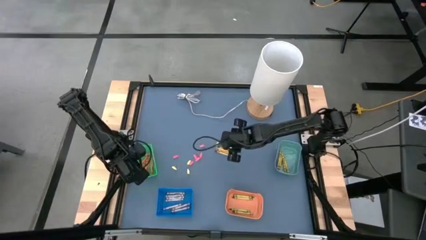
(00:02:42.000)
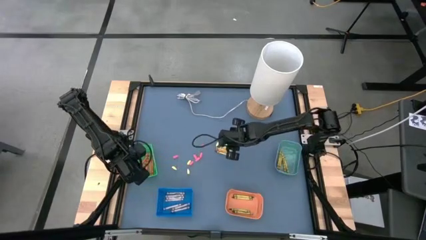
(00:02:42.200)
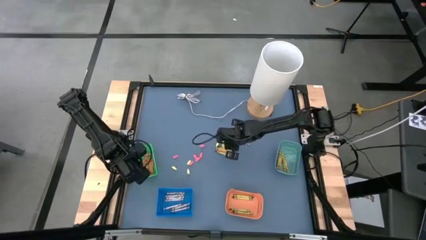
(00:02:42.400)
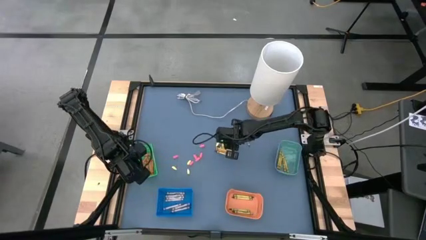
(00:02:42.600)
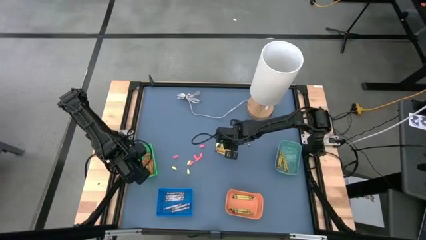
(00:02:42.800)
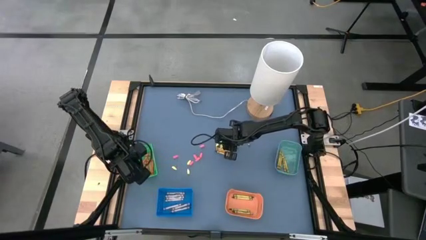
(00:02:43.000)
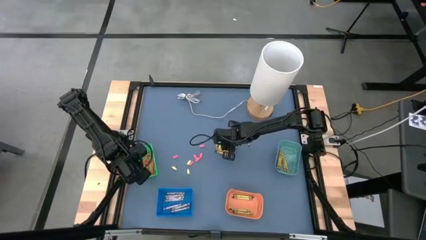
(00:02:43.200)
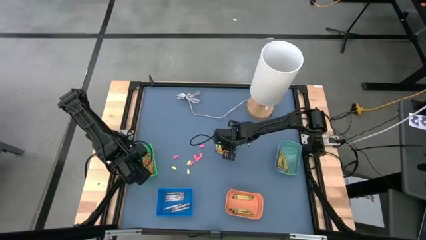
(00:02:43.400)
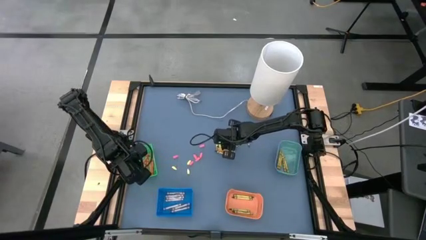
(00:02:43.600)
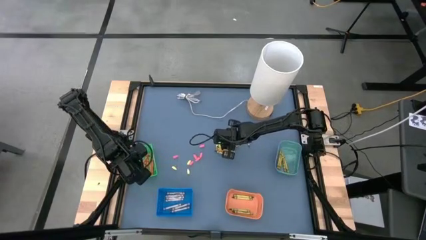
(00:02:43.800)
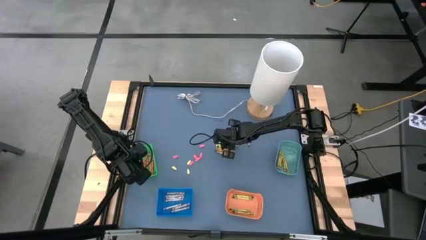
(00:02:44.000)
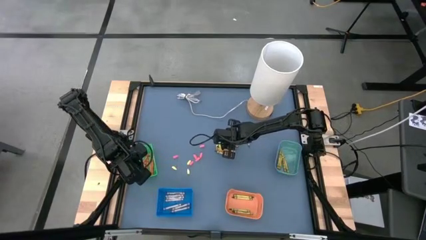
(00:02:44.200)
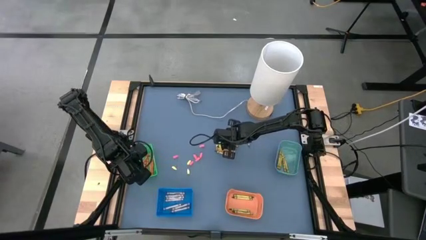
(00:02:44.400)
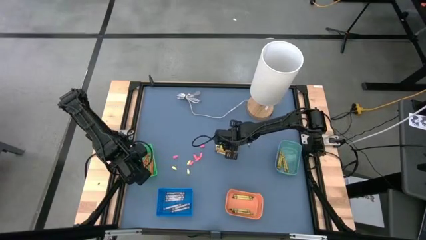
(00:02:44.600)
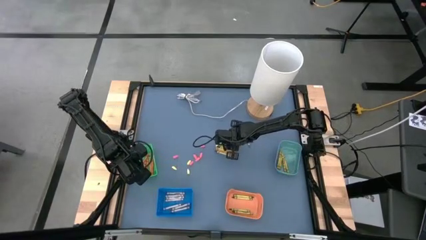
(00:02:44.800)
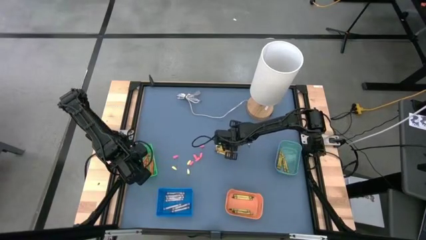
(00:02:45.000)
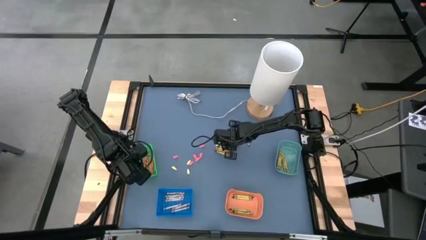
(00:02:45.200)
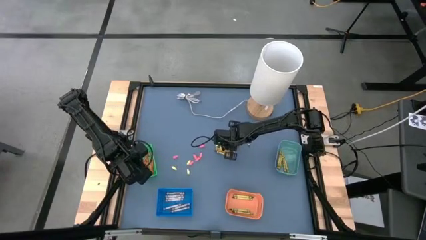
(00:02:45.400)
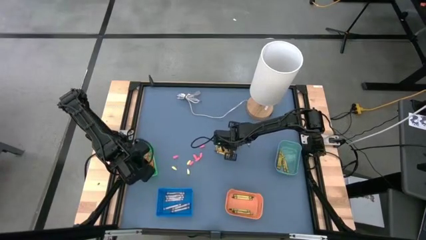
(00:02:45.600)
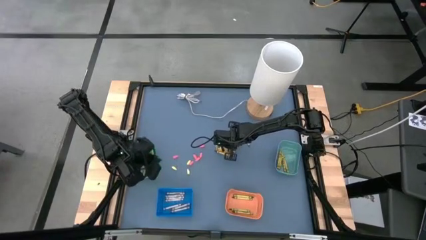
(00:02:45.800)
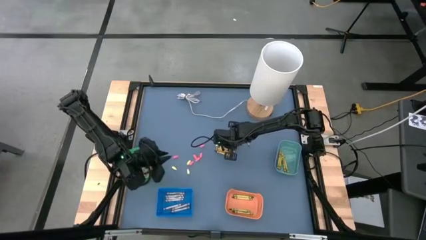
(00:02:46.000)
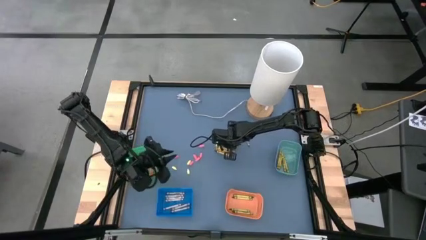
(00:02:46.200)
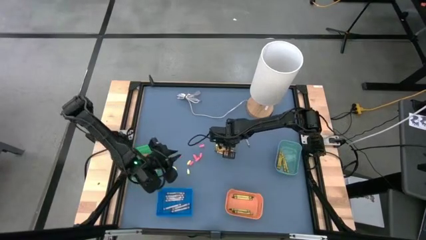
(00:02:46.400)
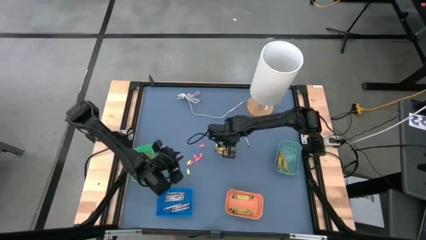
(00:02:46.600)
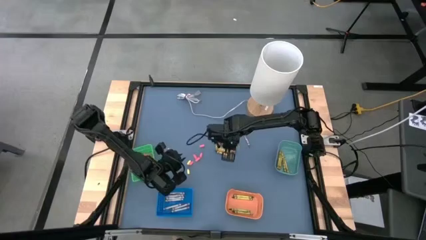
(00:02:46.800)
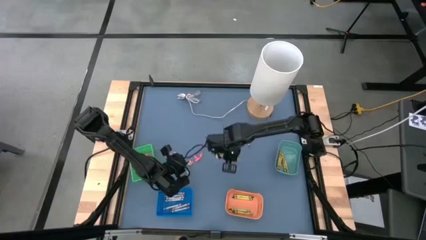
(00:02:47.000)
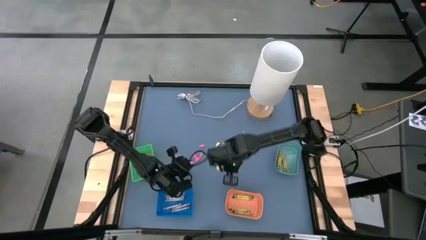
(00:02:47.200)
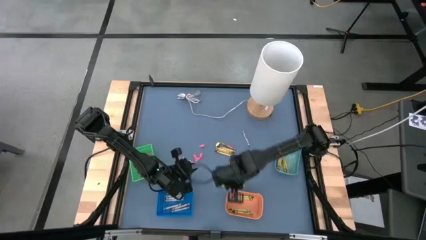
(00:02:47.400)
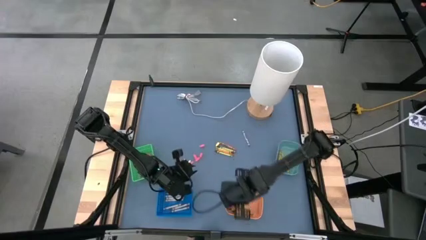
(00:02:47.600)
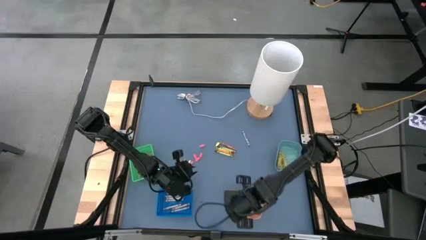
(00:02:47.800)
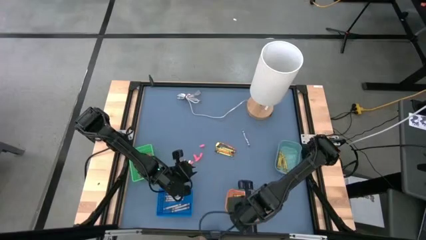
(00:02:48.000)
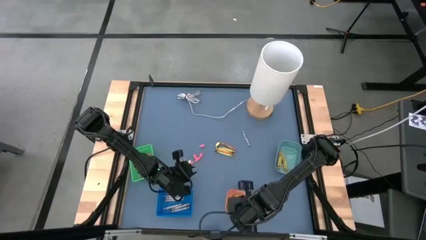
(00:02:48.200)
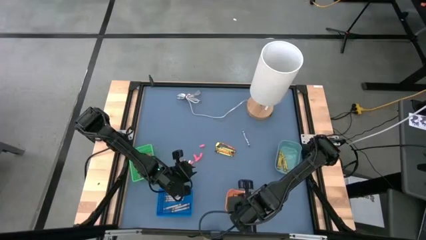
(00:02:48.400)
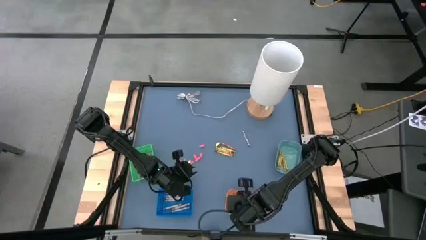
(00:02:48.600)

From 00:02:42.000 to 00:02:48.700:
Task: Sort crayons
Put the green crayon into the orange bin

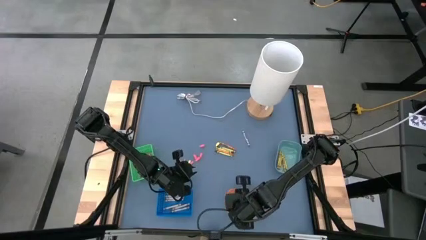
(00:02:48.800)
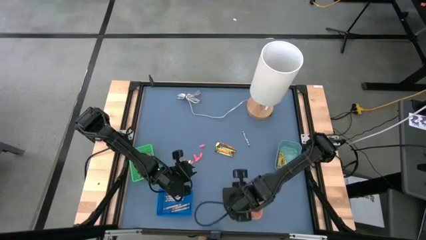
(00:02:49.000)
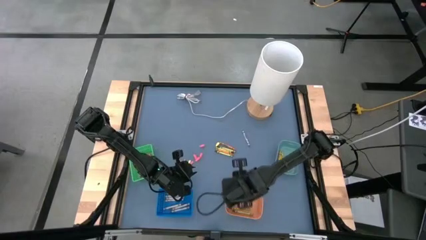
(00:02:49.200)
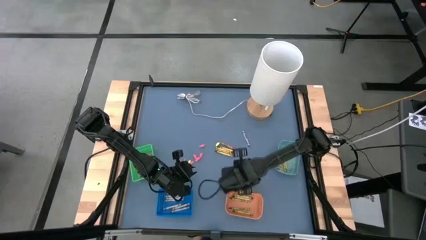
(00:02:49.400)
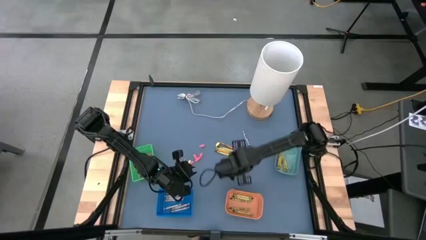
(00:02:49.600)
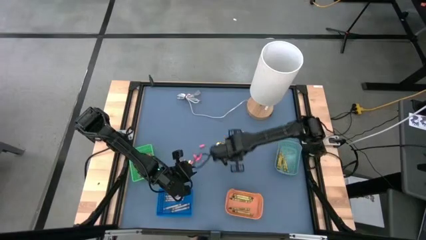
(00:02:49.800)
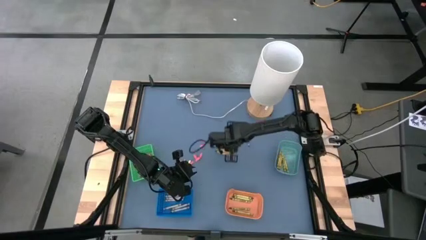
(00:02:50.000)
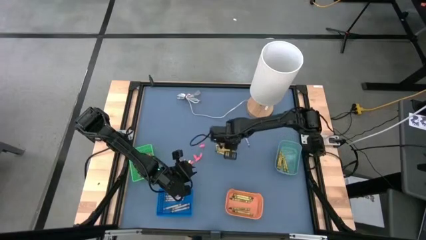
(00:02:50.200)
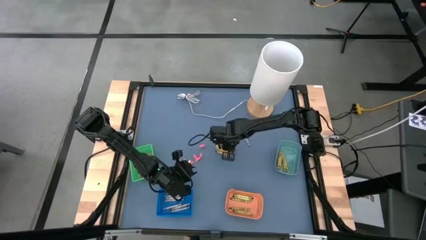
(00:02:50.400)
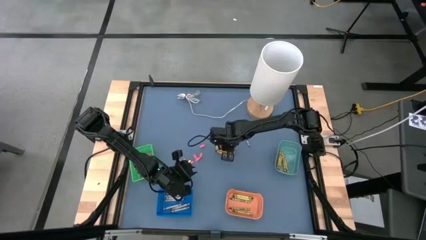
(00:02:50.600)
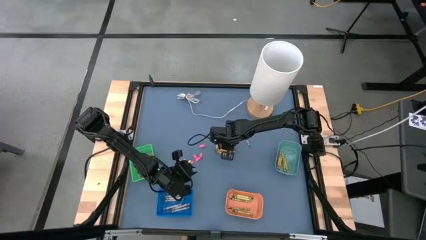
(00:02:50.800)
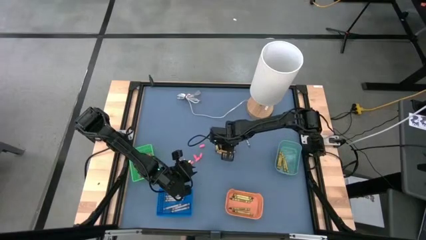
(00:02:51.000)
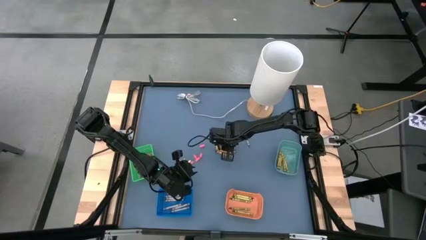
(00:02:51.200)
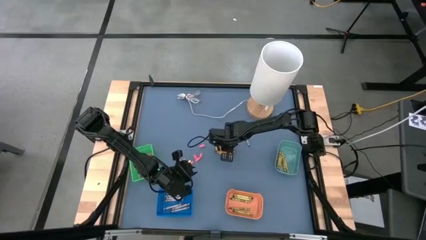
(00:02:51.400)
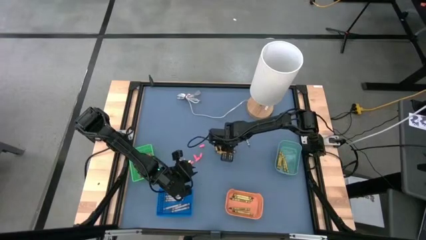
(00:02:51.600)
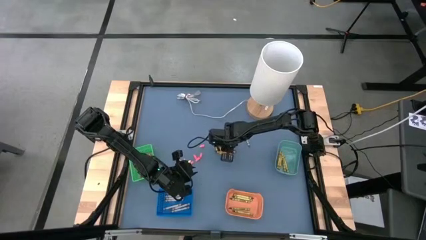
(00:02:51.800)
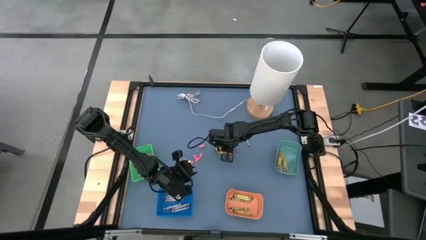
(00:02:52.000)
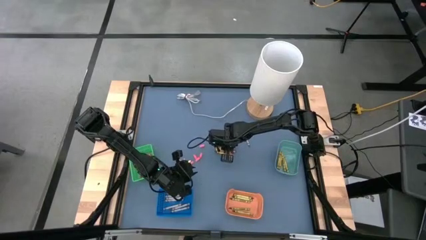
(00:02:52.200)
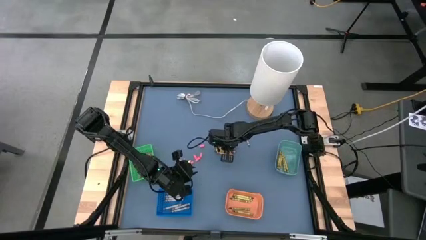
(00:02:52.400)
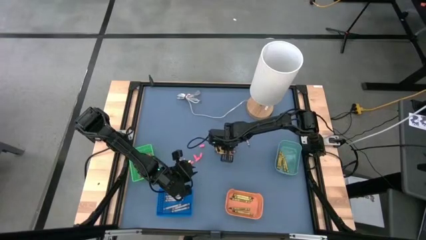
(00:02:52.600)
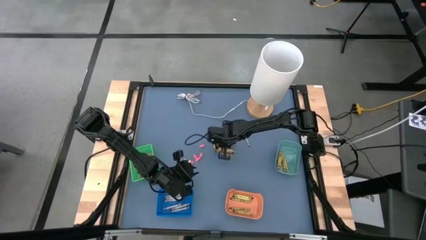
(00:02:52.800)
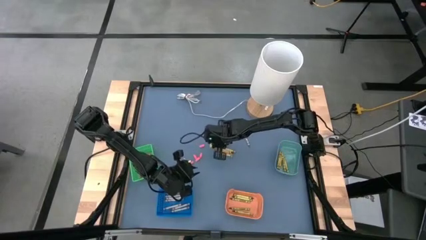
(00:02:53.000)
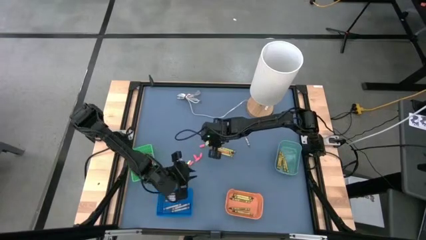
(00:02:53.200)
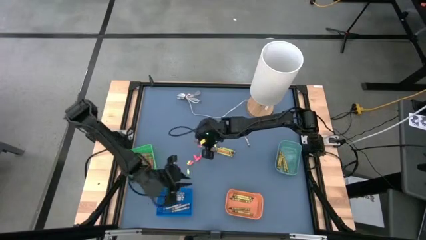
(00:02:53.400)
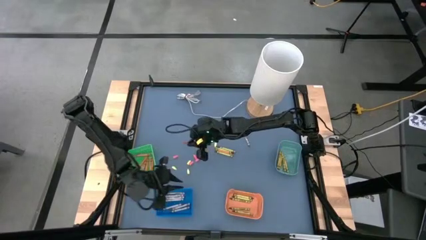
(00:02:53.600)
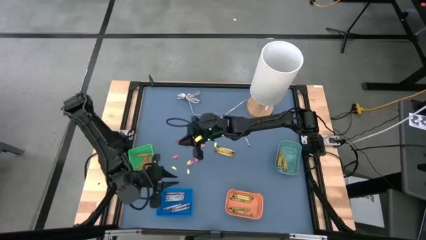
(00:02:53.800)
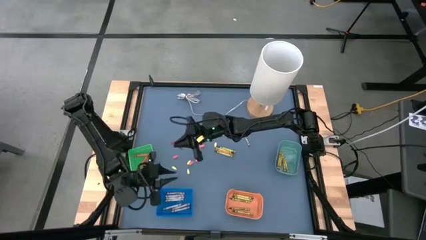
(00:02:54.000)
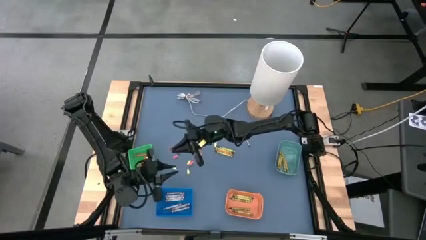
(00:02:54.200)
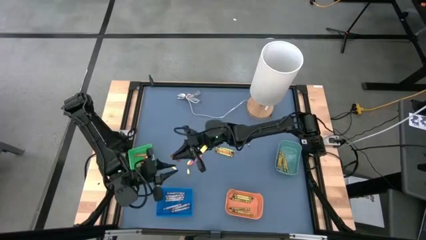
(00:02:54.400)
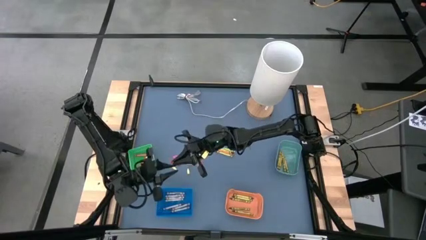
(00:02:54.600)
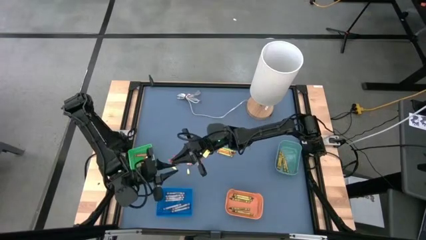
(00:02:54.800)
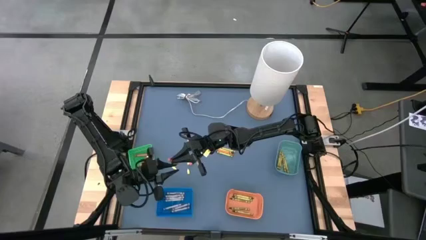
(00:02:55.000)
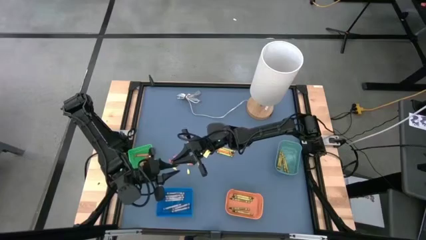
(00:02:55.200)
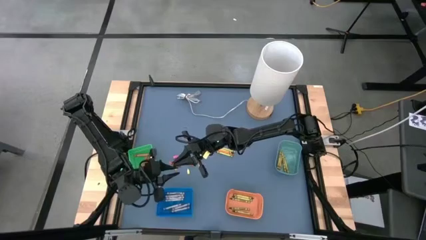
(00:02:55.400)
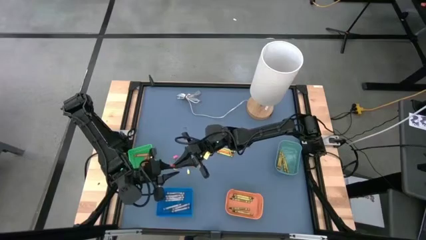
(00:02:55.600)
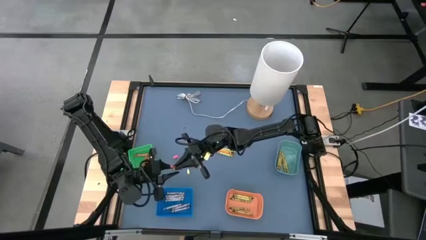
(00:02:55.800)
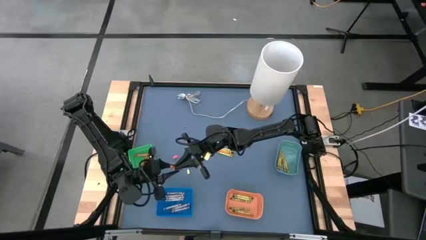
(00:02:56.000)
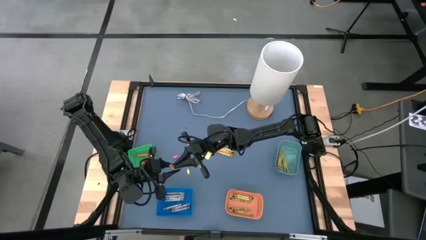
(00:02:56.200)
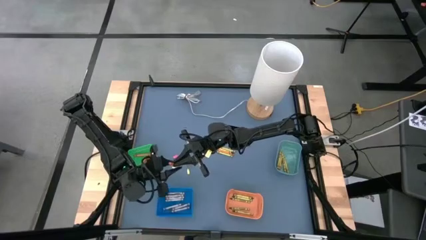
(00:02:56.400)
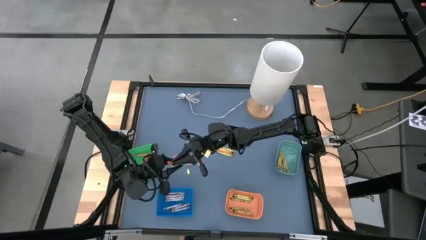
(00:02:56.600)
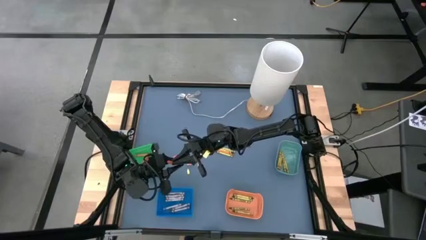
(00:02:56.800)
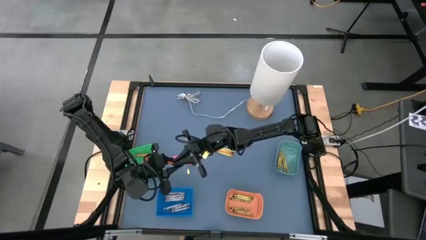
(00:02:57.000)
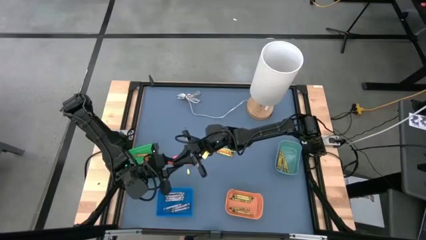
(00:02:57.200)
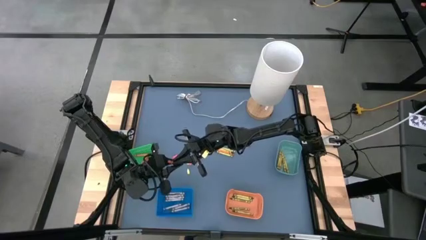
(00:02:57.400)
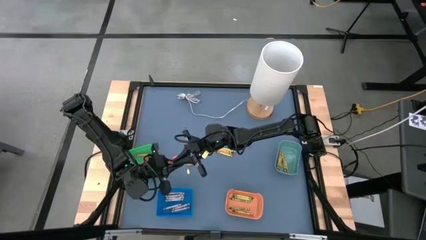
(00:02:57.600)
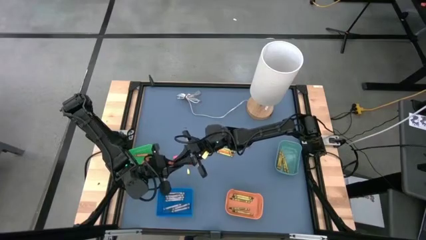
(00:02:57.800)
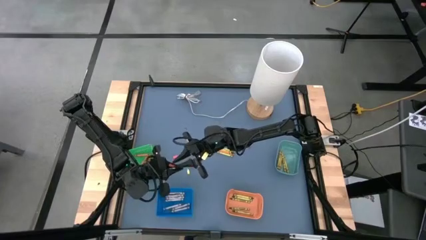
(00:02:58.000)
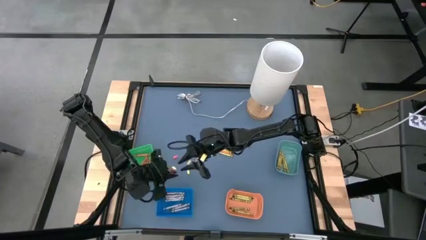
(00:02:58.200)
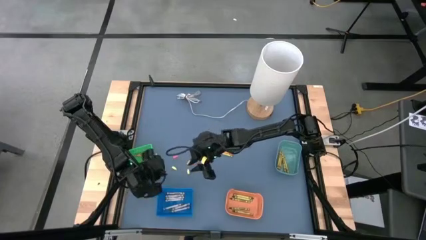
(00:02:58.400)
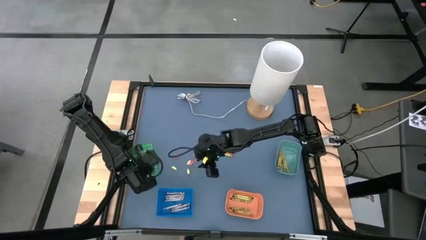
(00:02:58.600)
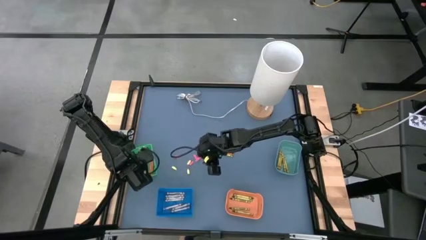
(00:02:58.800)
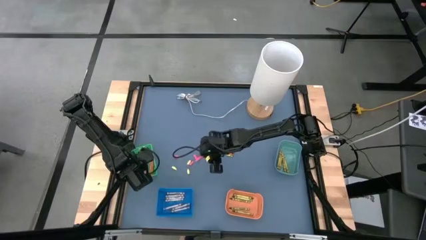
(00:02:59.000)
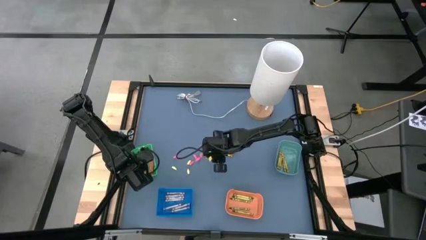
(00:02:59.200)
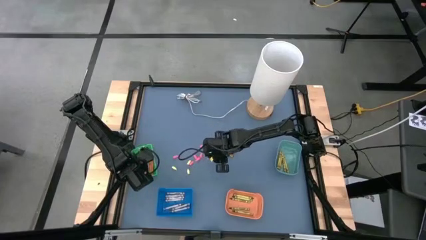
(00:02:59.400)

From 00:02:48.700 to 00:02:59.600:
Put the orange crayon into the green bin
